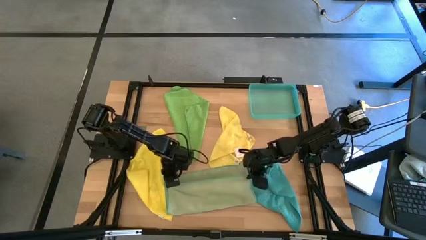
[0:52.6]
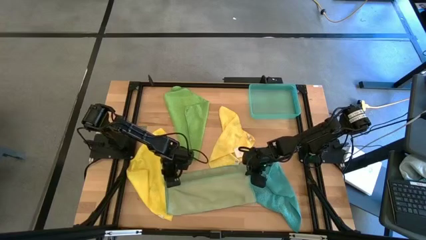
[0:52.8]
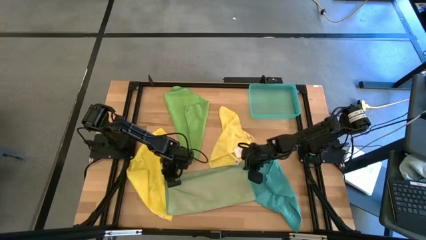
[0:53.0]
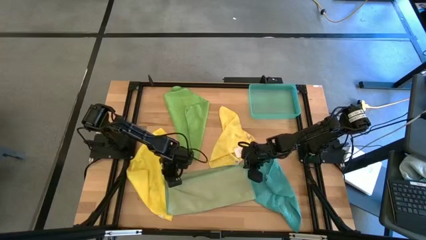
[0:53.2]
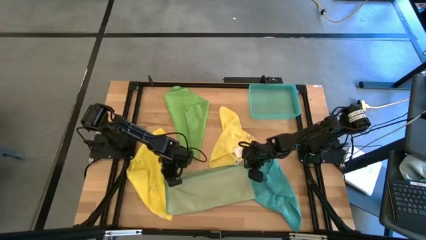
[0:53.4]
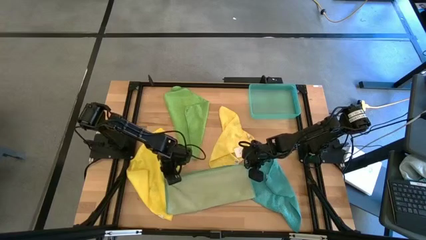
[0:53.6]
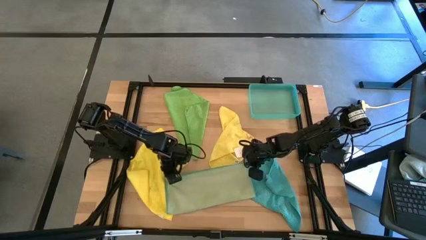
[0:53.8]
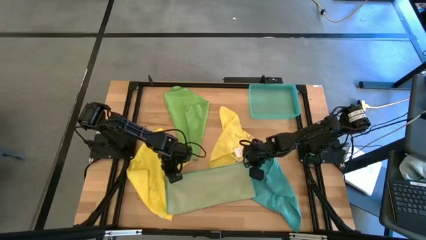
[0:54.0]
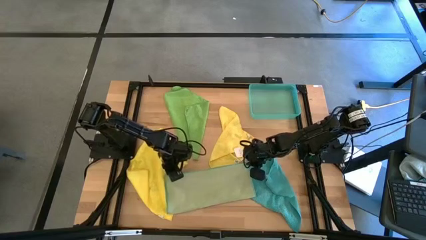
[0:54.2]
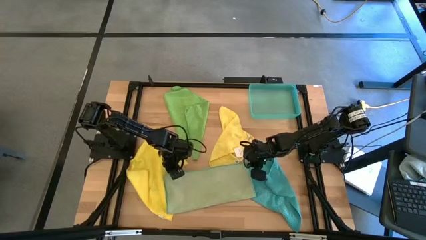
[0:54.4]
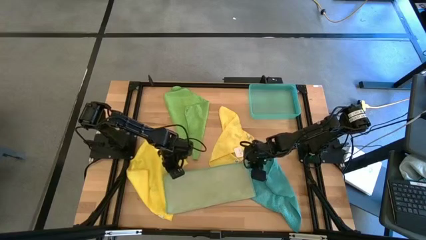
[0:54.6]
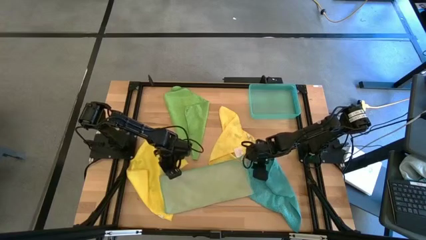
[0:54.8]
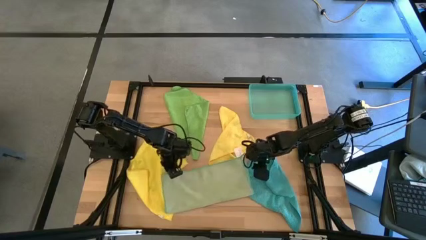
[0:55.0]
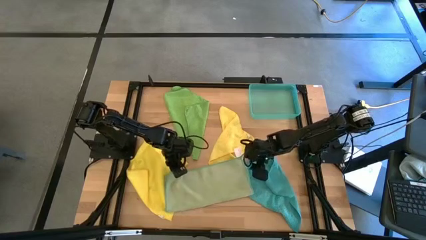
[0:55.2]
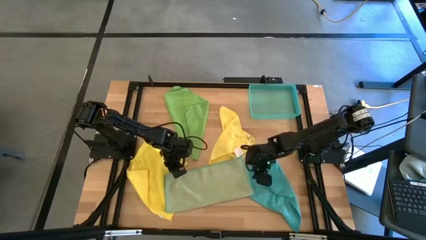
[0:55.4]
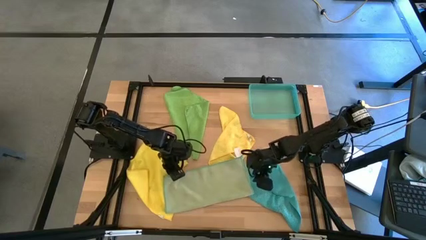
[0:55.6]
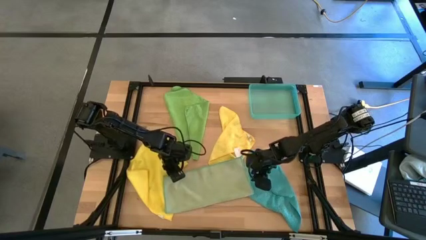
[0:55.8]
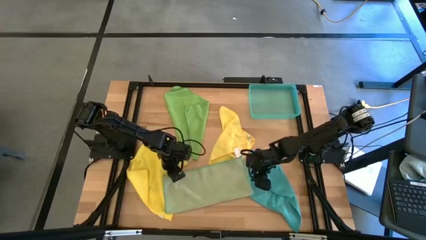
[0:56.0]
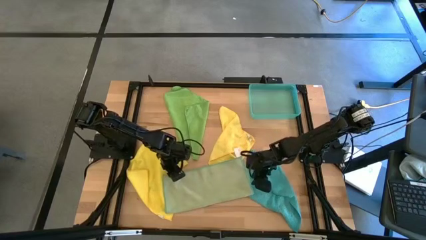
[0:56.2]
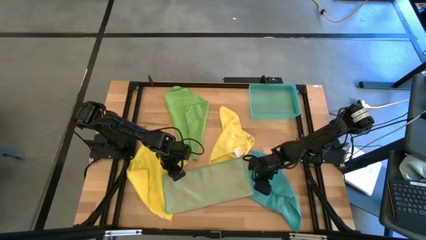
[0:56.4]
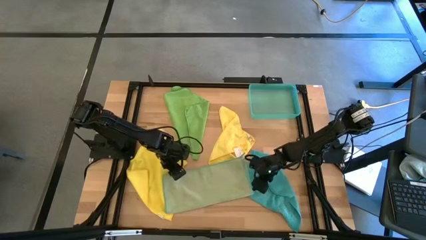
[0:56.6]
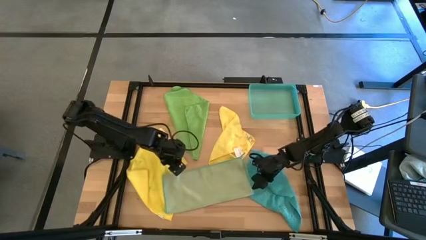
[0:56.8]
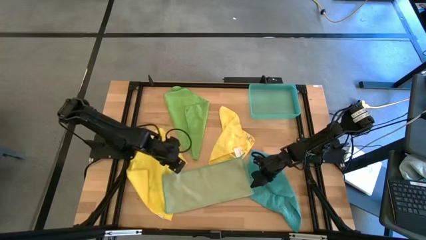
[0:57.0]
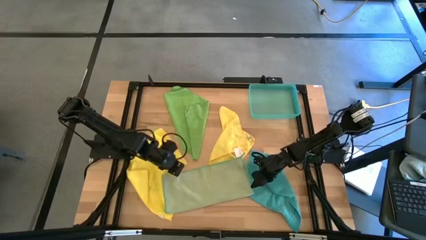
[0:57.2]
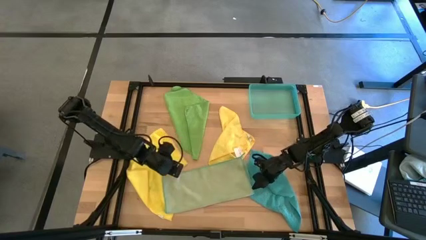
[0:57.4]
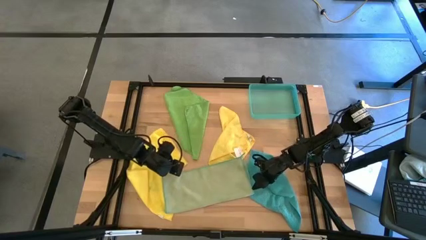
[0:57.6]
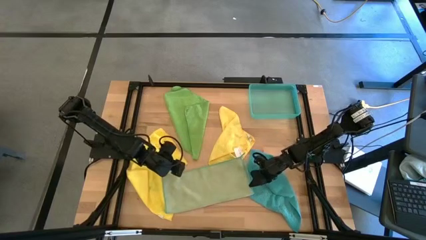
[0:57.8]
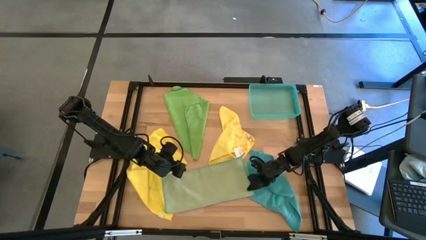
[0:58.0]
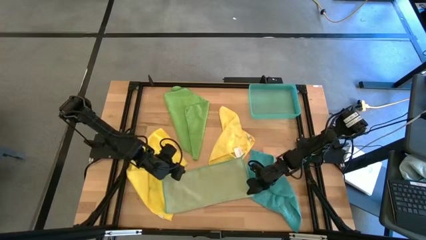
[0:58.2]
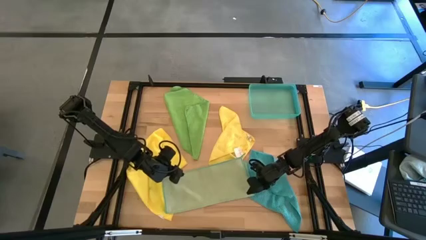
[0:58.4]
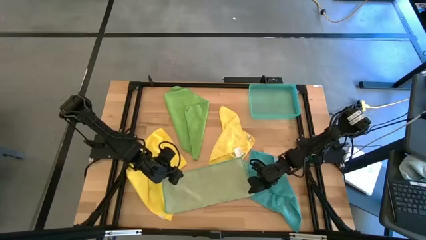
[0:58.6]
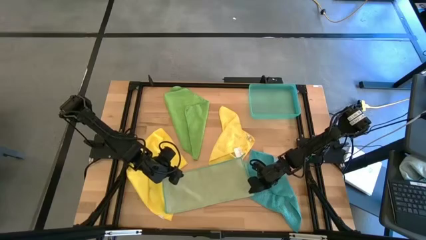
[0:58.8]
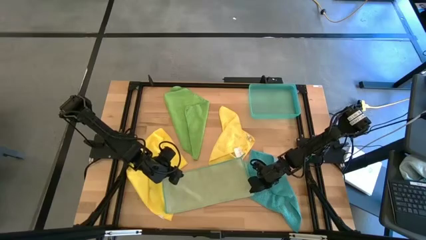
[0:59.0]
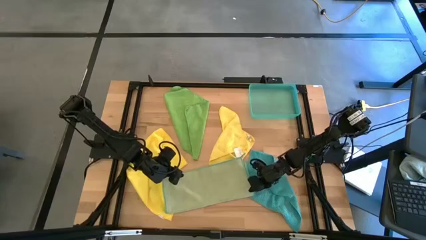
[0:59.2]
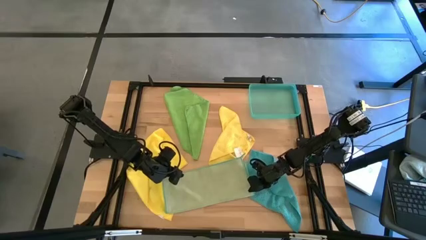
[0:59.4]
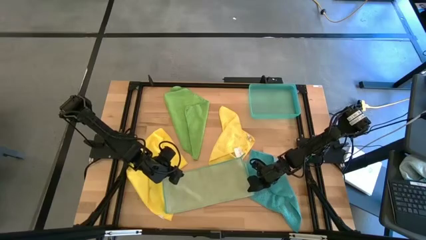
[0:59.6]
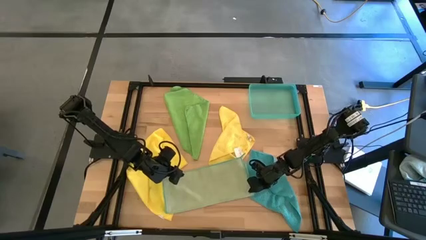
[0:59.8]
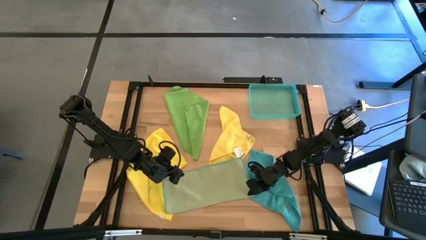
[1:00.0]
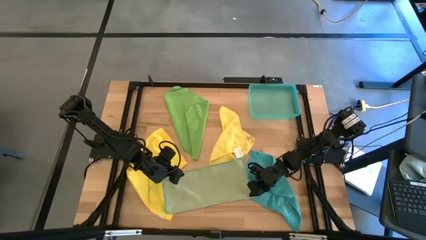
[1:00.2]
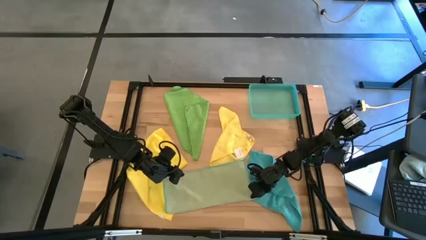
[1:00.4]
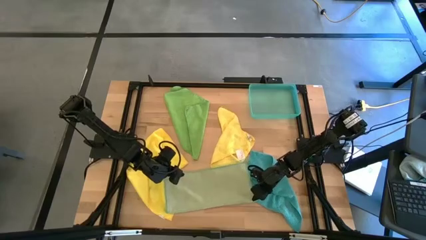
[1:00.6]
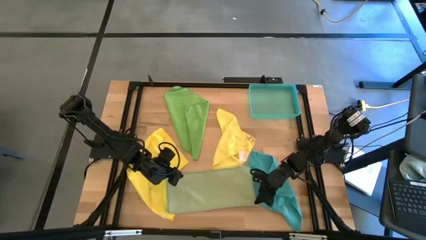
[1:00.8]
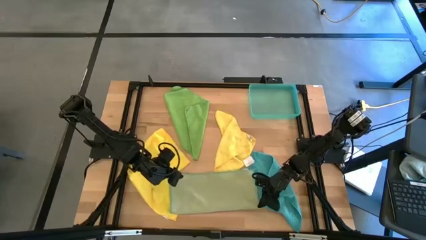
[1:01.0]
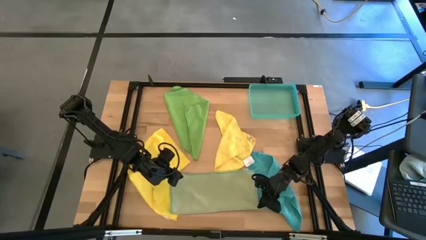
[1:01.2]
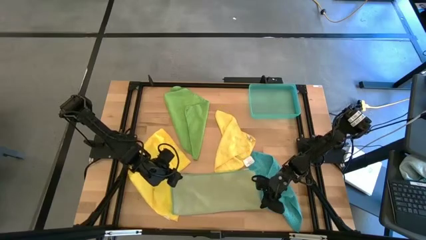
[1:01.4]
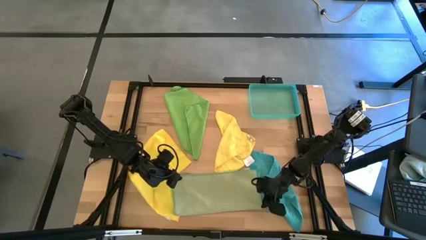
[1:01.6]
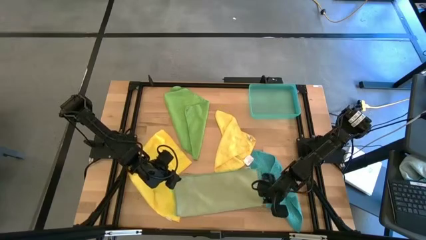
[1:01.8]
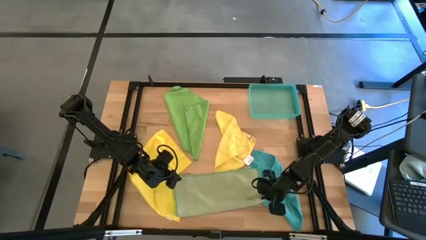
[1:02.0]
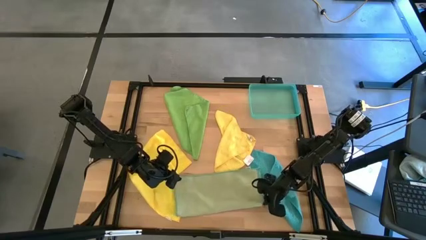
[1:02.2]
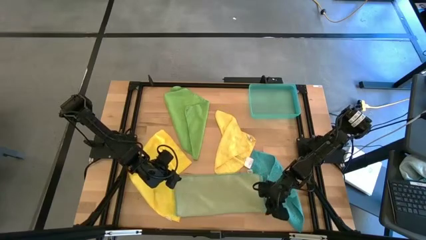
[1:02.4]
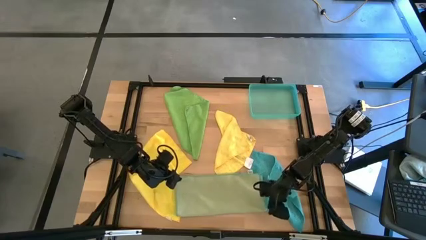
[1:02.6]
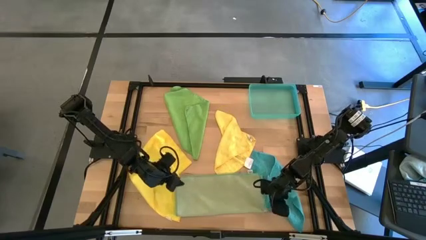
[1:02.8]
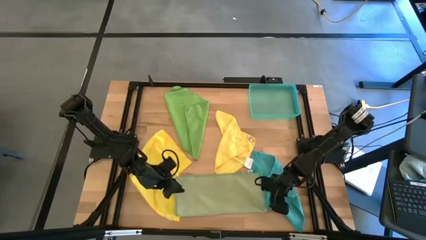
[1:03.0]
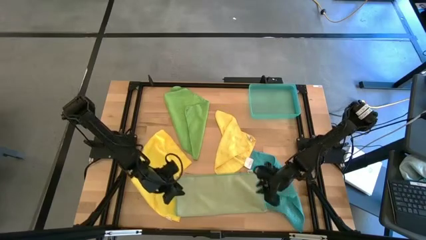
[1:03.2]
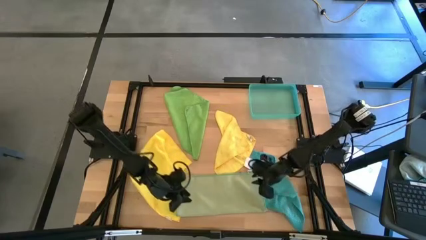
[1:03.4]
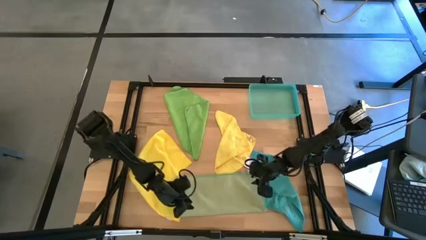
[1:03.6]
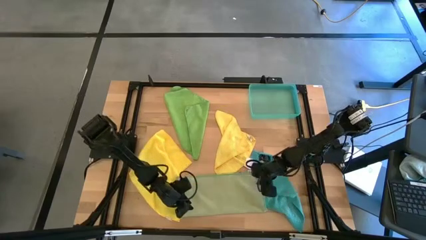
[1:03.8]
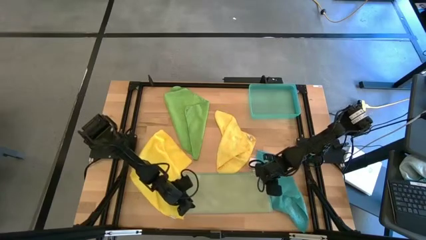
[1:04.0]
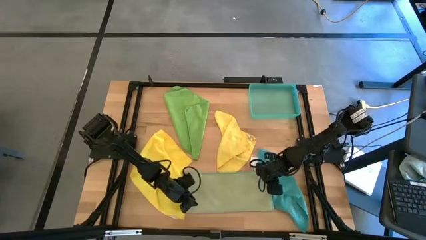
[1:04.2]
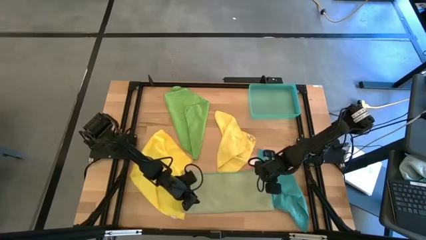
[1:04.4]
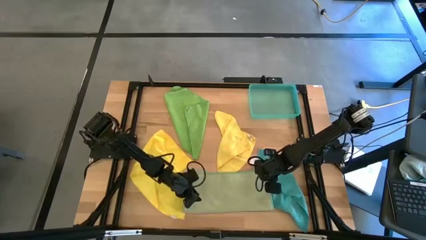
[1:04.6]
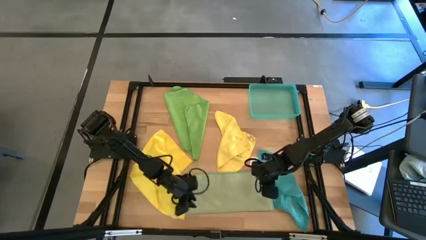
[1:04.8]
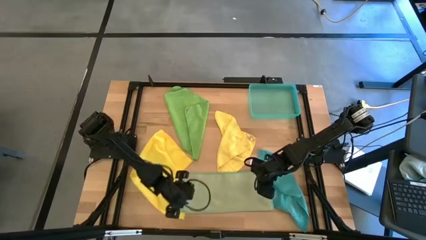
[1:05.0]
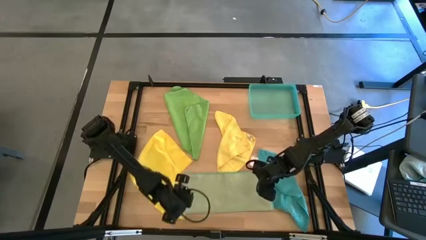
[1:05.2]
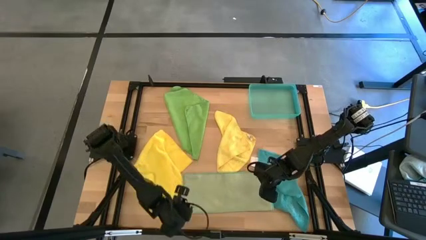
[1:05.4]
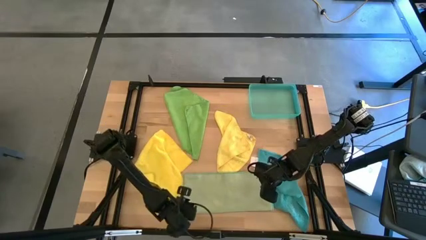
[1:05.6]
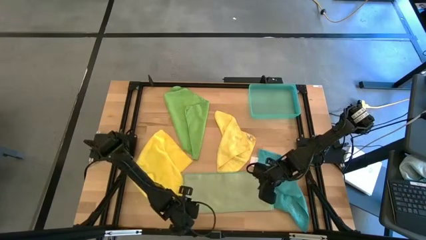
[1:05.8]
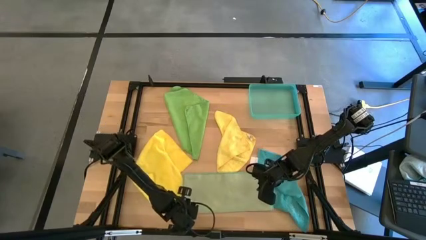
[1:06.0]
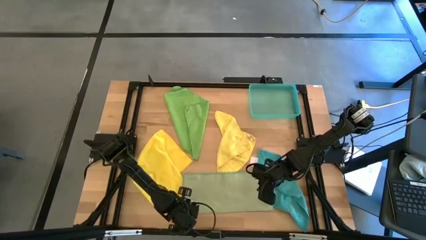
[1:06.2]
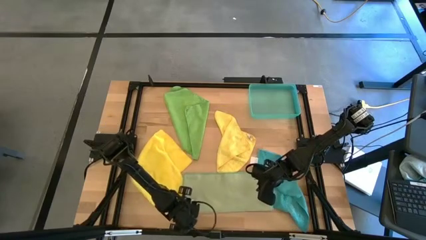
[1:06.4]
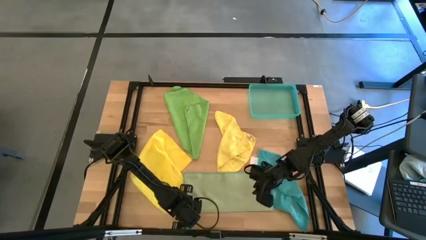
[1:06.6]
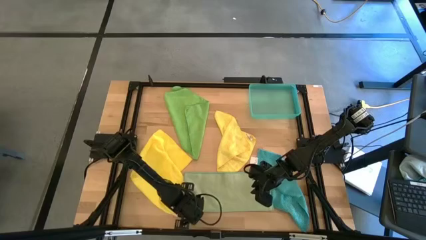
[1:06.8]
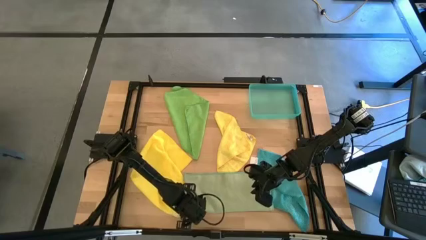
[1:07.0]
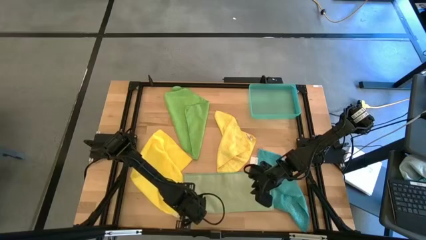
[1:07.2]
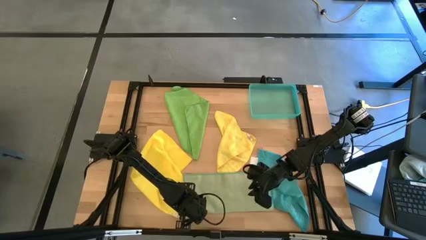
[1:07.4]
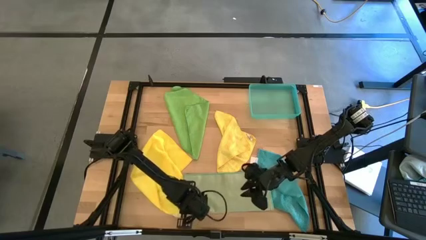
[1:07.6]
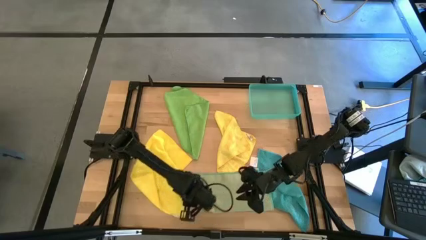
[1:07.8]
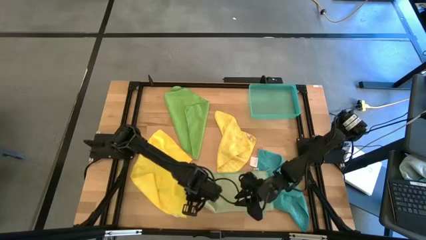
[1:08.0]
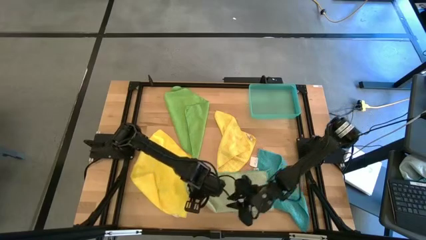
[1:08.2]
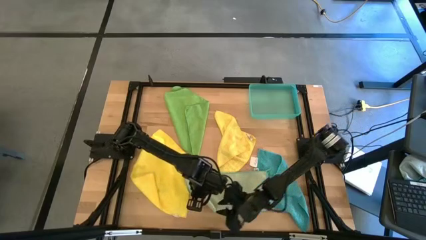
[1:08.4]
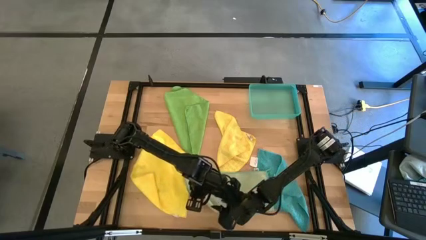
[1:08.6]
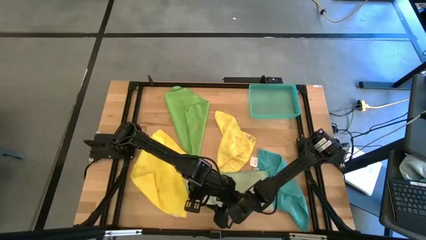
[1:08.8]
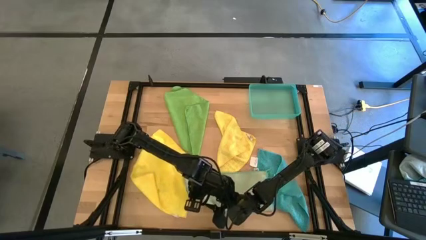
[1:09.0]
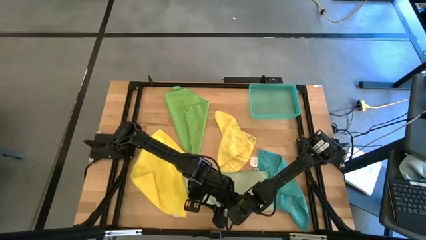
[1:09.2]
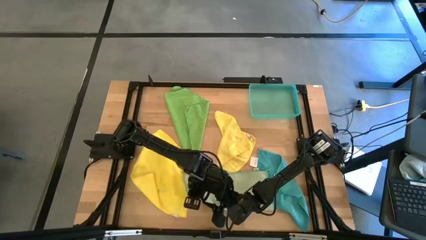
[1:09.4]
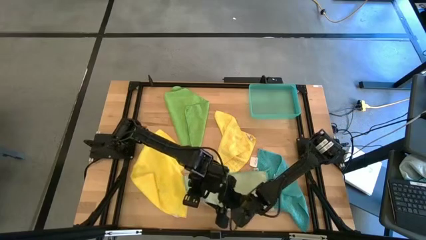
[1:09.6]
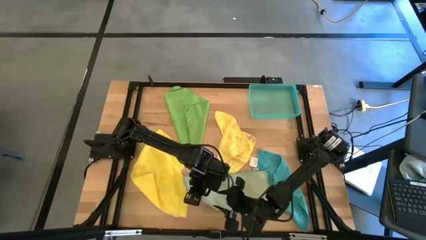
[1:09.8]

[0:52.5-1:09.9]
Task: Fold microfiber towels
Fold the light green microfiber cloth
